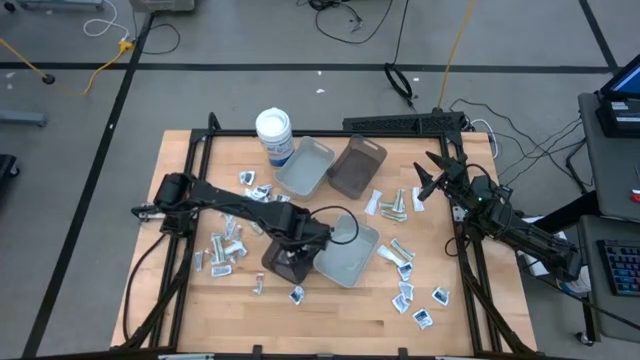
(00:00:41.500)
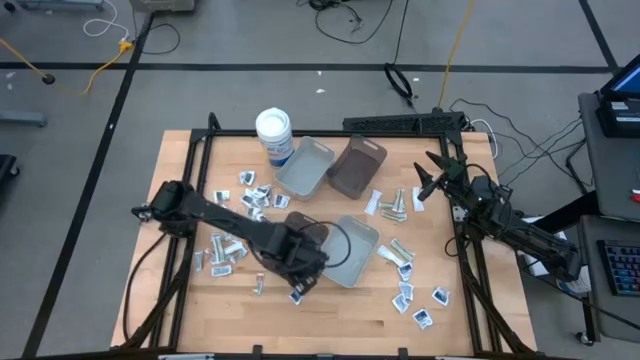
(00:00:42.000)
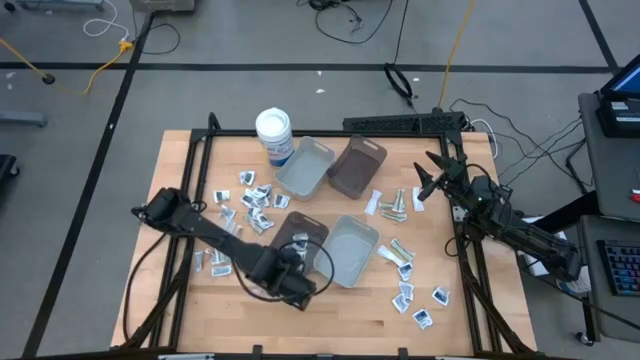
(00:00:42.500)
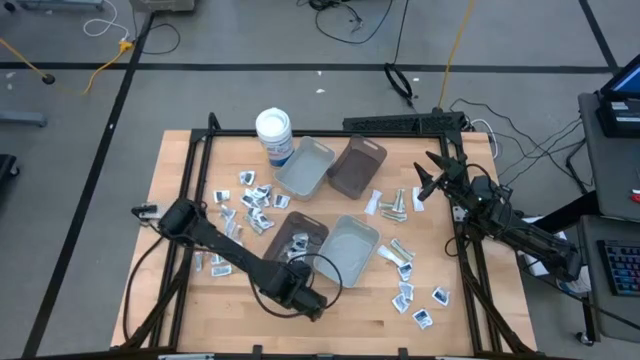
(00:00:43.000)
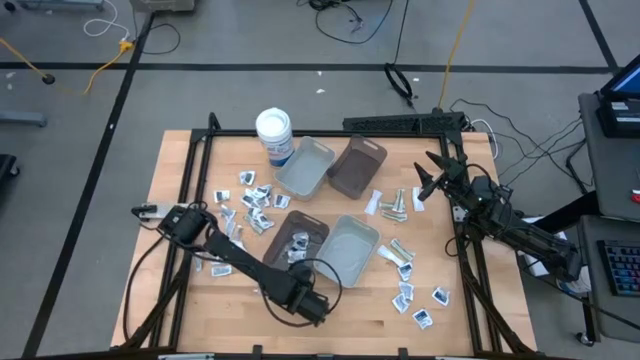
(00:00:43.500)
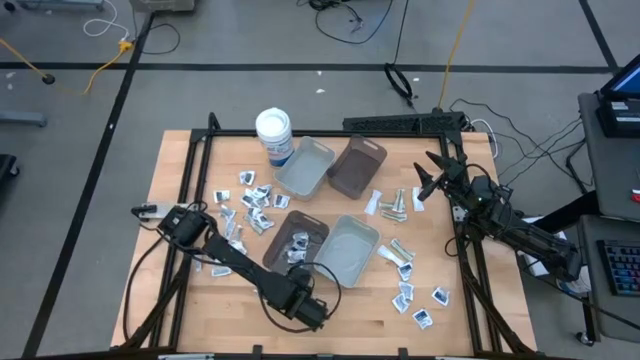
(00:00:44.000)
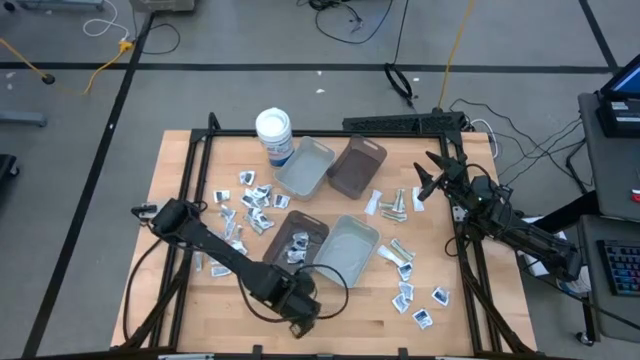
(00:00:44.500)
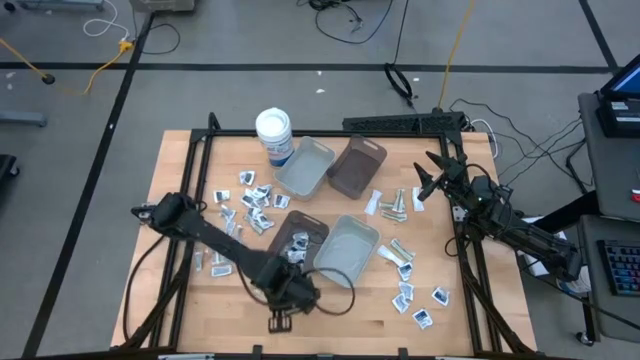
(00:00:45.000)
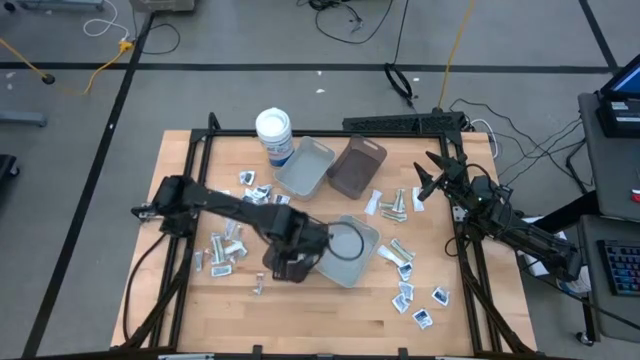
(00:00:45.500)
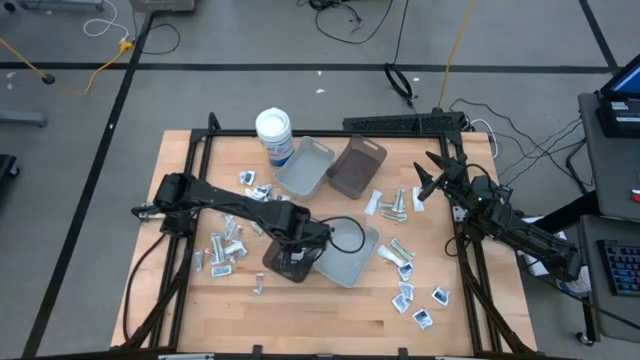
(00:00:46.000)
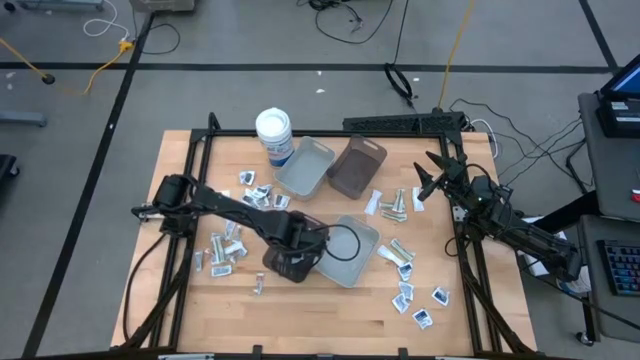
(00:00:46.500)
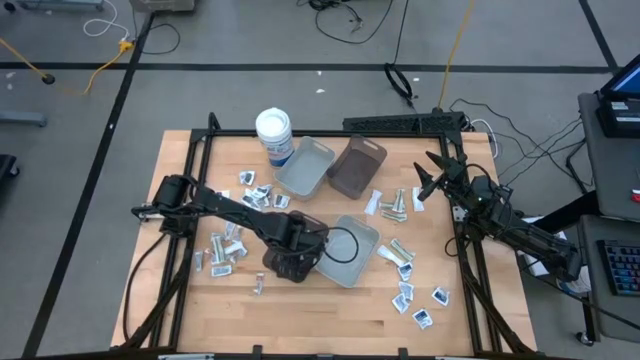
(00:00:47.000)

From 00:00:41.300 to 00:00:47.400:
Task: Pick & Place First Aid Supplies
Put the blue alcohol pad into the bottom black bin

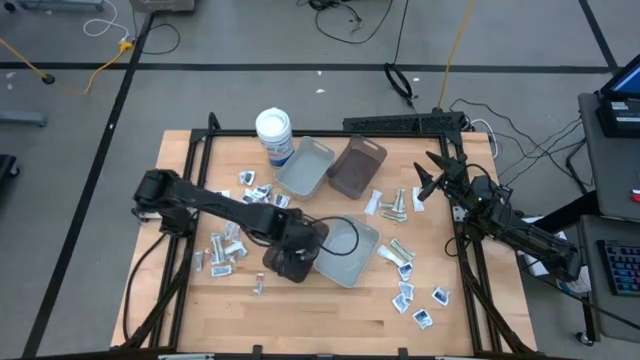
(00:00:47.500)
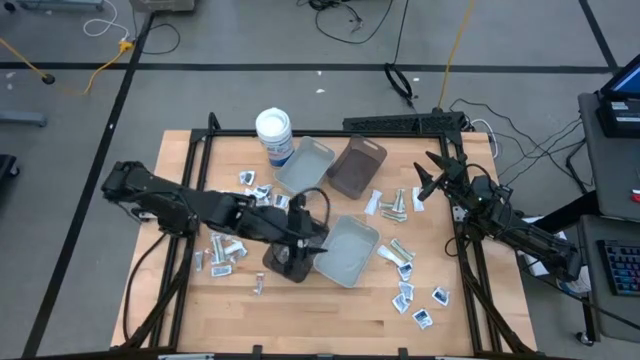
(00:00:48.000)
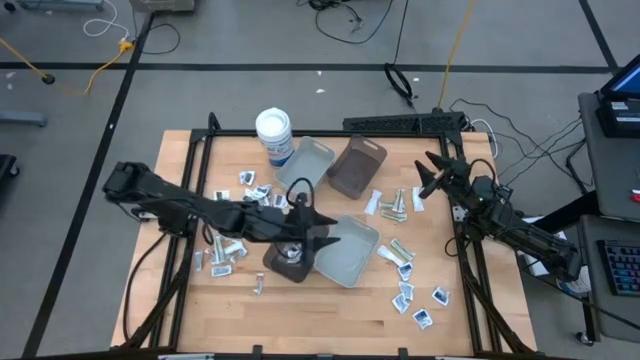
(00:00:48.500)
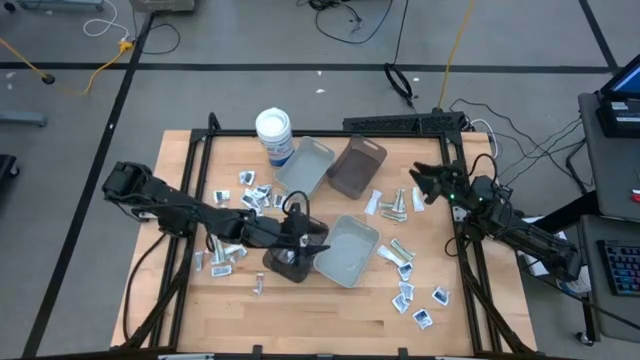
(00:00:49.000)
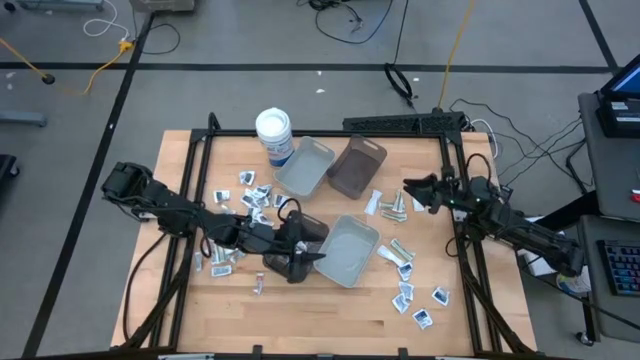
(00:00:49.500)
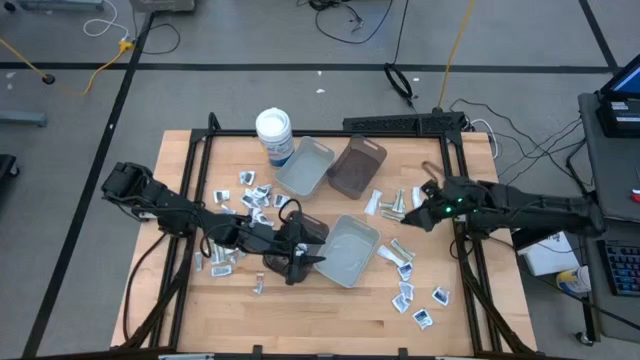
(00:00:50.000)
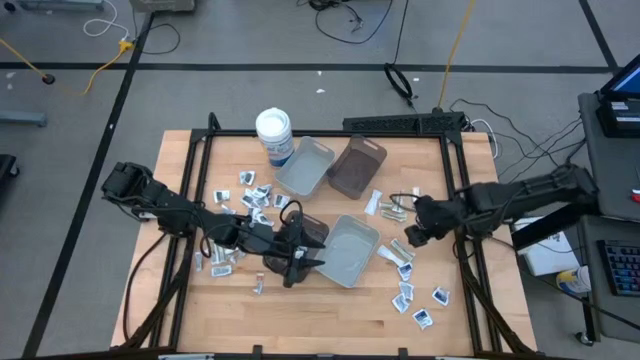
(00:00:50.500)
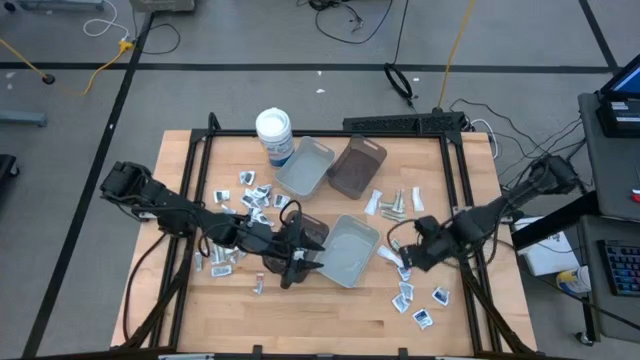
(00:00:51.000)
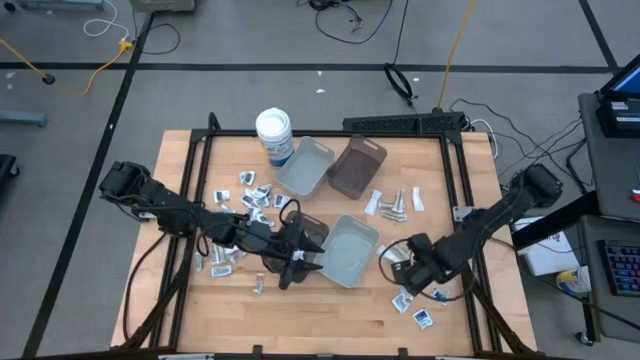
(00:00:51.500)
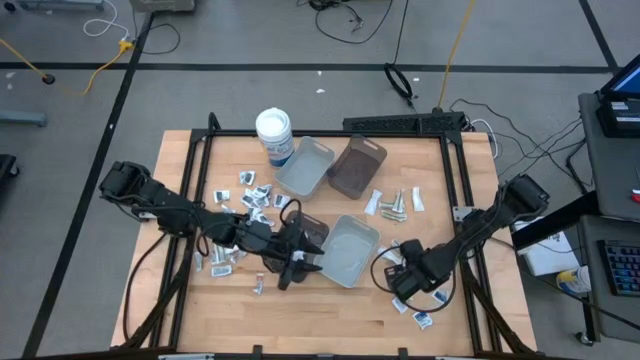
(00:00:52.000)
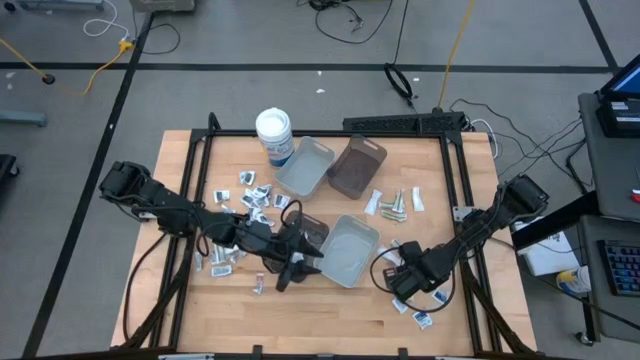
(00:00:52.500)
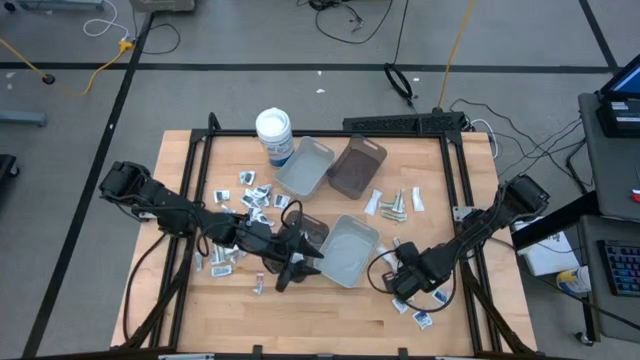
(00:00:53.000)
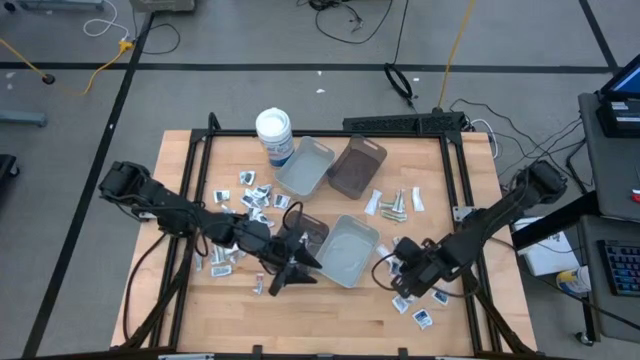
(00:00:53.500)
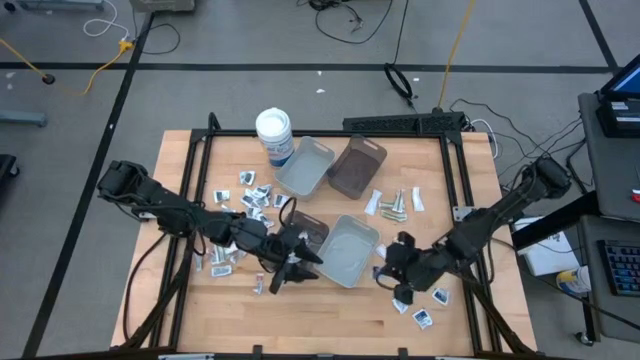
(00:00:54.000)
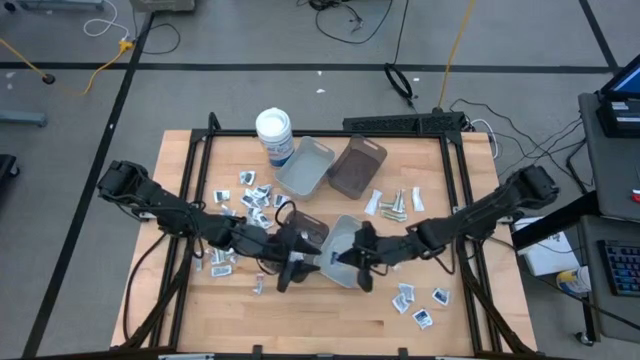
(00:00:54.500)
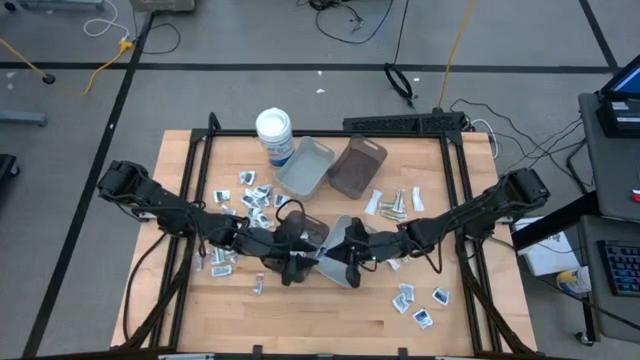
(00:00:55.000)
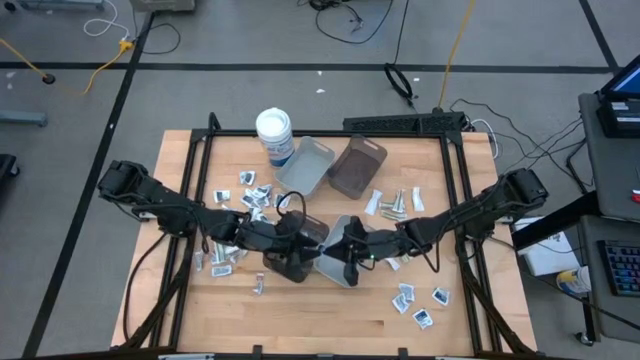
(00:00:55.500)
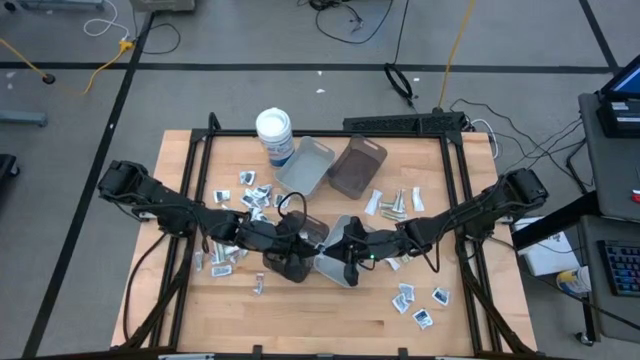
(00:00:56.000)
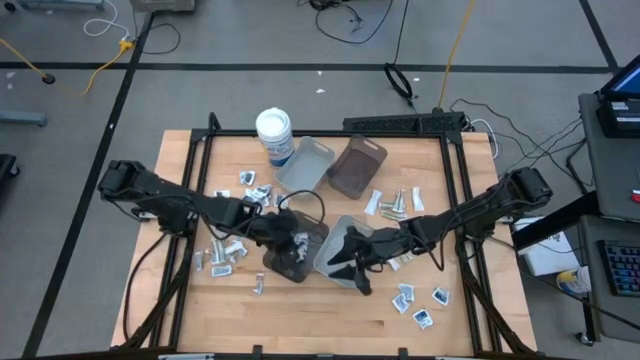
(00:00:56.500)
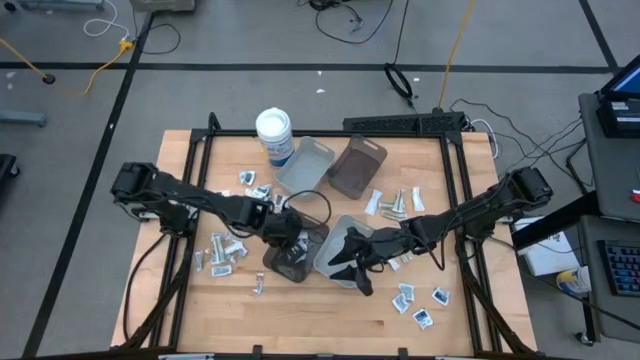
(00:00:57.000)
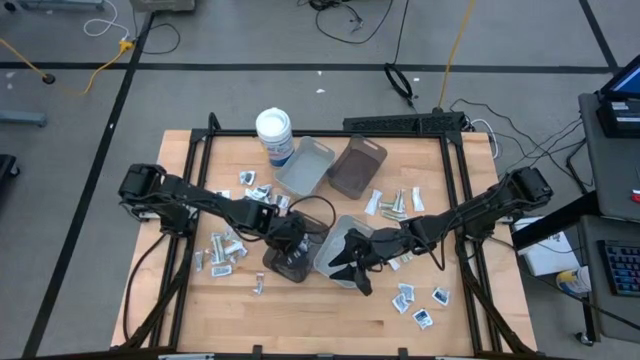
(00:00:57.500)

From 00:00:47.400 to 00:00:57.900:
Put the blue alcohol pad into the bottom black bin

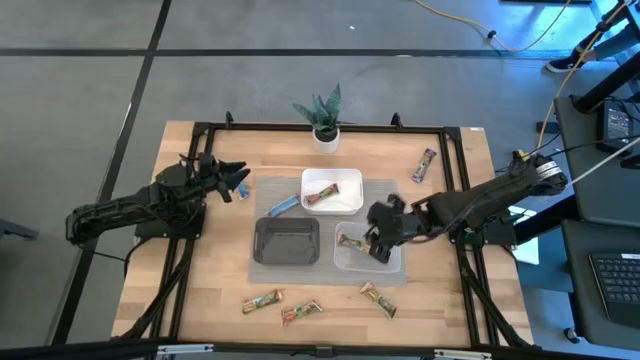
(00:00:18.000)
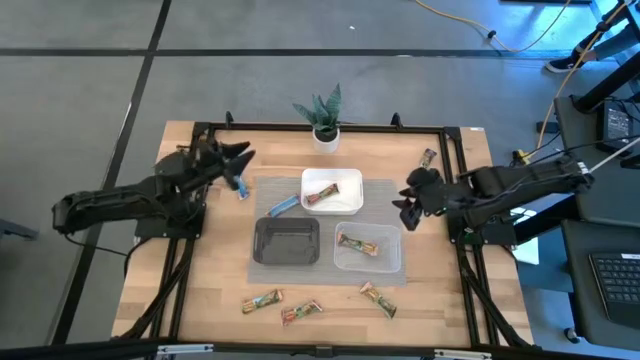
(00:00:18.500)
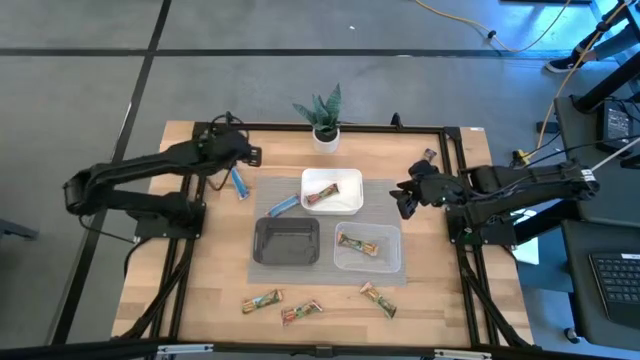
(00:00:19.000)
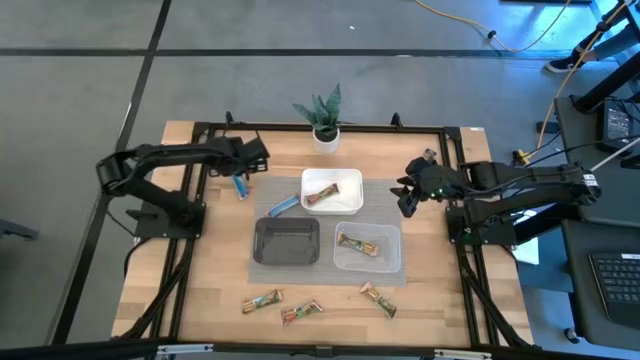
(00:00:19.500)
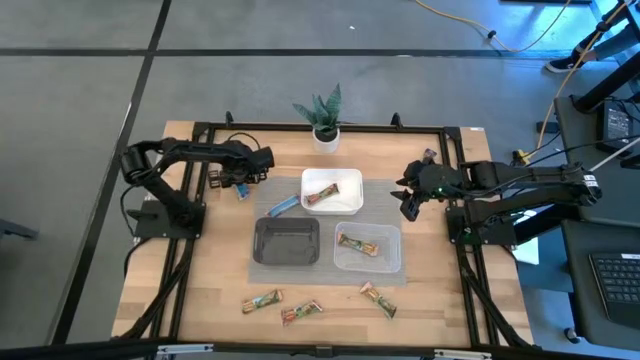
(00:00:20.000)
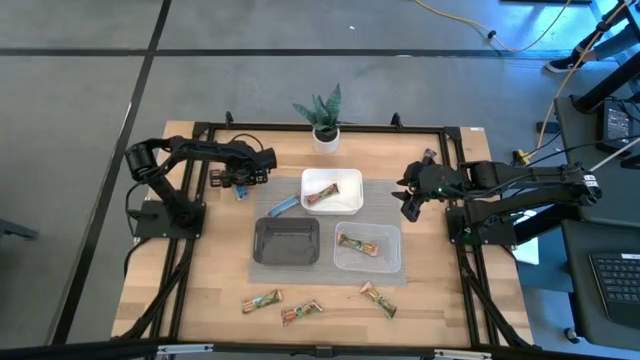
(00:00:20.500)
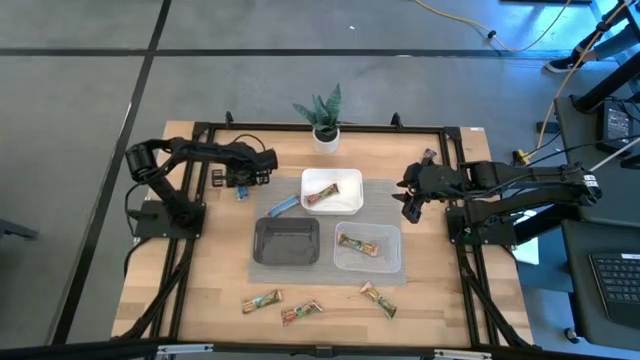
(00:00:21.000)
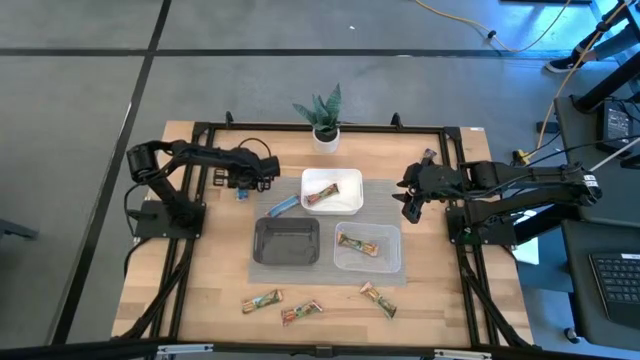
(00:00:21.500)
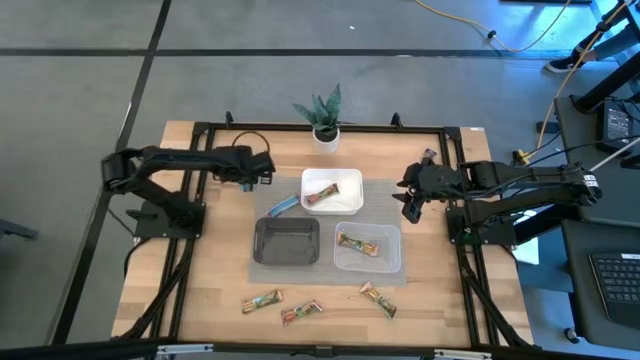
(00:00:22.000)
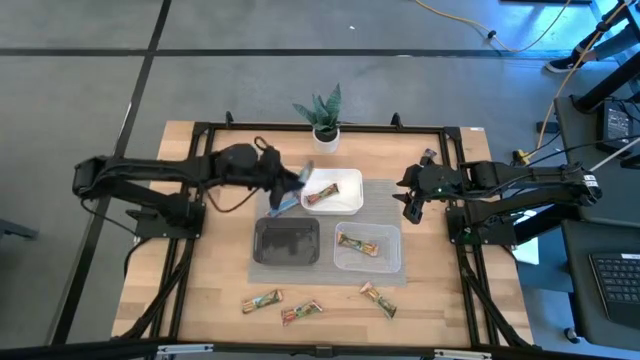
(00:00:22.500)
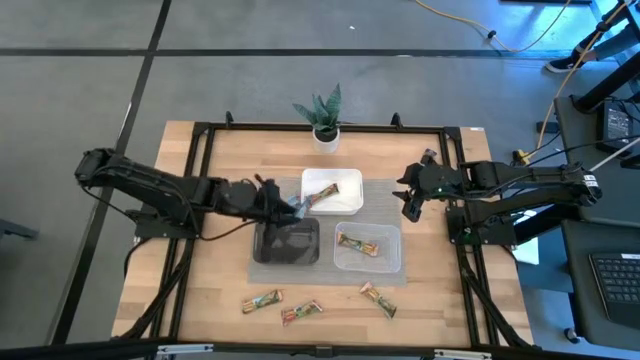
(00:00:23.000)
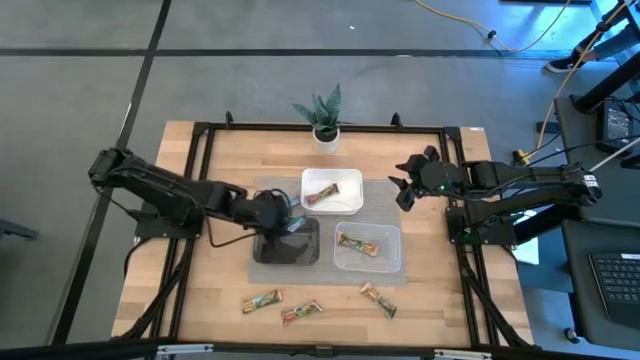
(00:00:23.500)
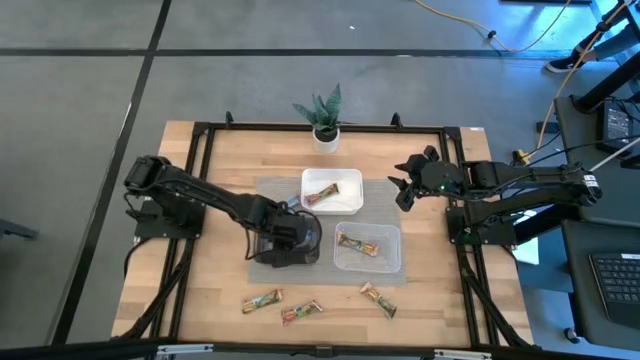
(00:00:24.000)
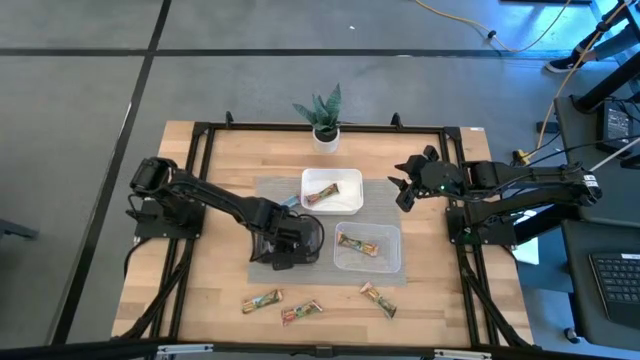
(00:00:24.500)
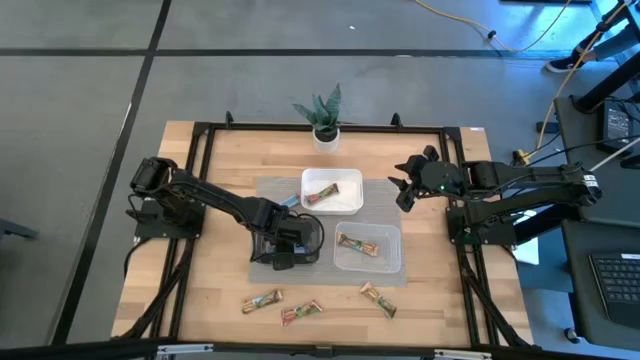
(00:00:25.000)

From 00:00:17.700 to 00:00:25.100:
Task: Pick and place Granola Bars by type
Put the left blue granola bar into the black bin
